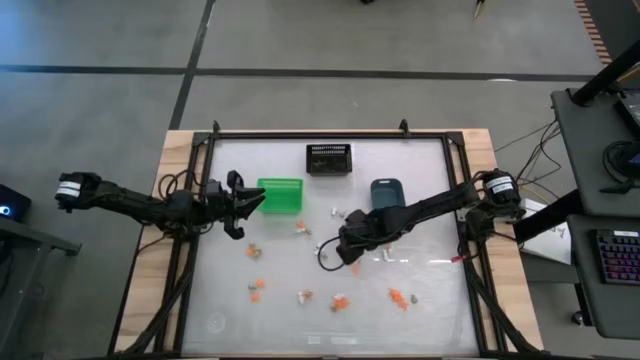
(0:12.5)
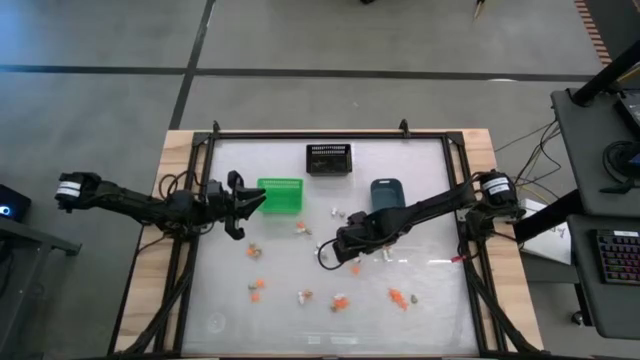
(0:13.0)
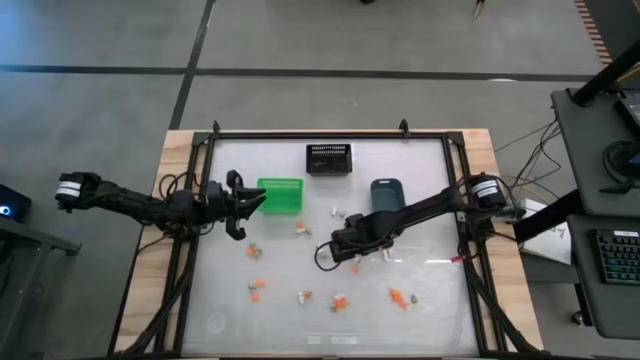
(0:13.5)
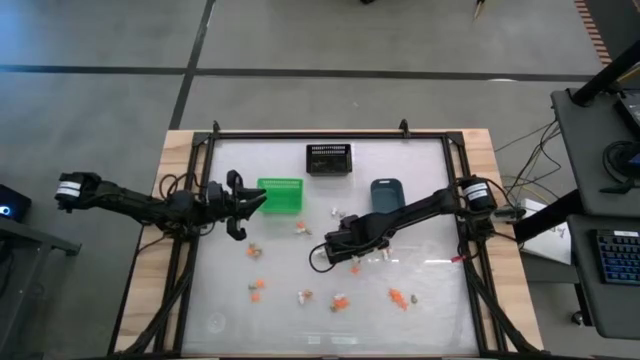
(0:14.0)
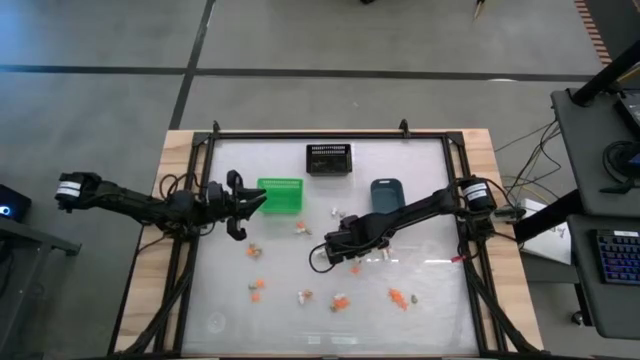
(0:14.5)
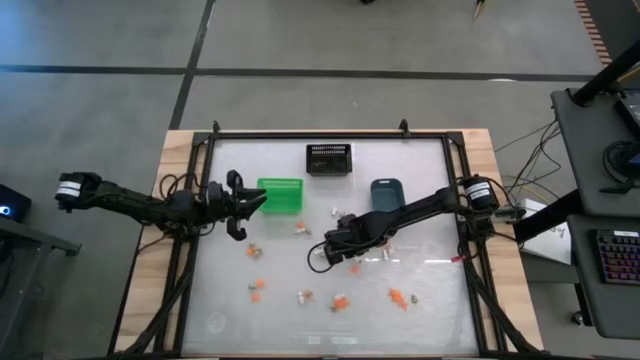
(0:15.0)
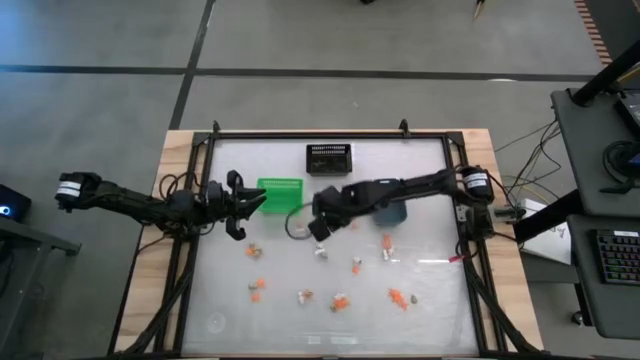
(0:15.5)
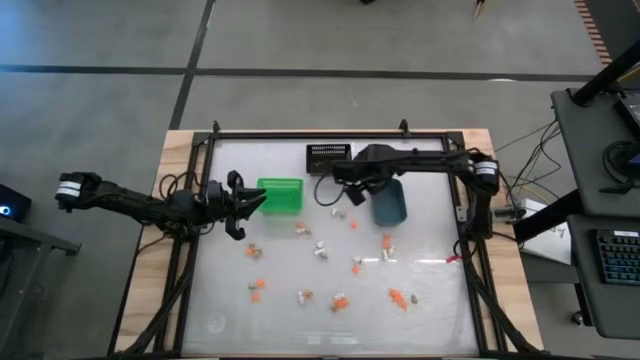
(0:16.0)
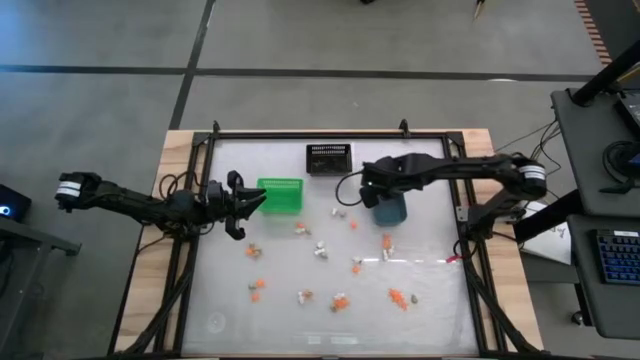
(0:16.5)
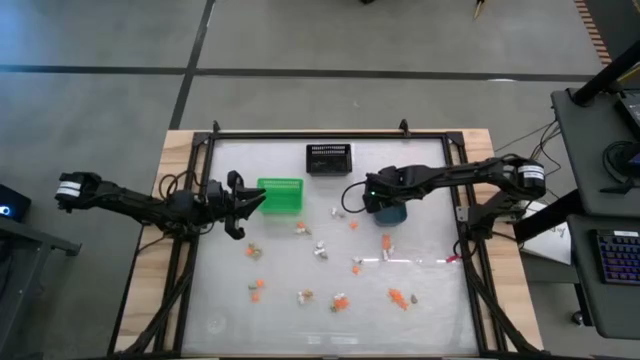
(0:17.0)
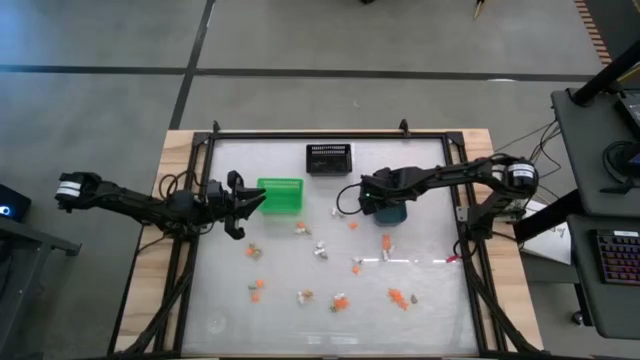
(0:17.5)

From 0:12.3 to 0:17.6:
Task: Sort Halloween decoration
Put the white skeleton toy into the blue bin

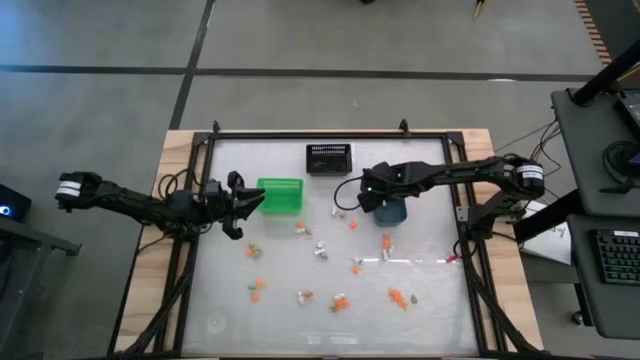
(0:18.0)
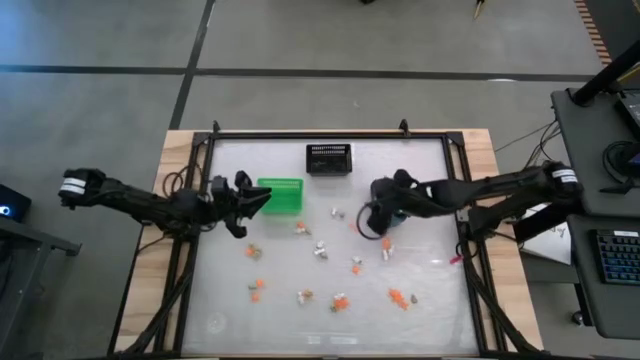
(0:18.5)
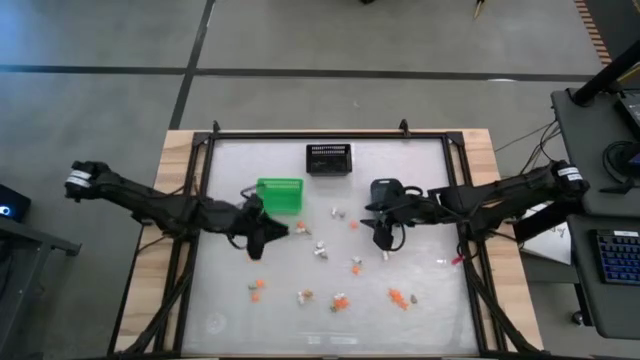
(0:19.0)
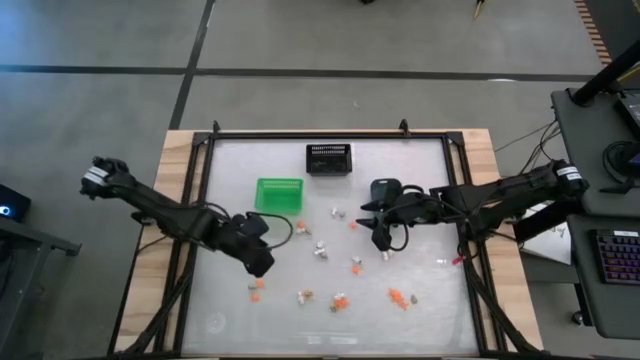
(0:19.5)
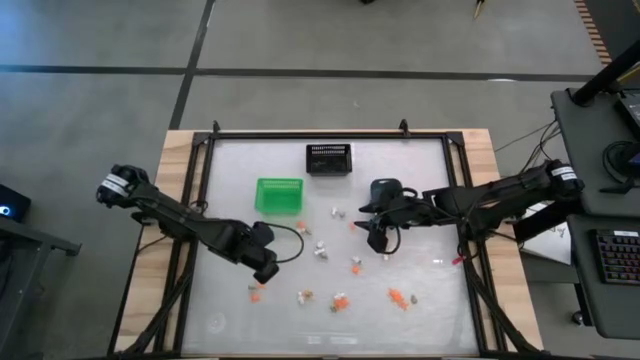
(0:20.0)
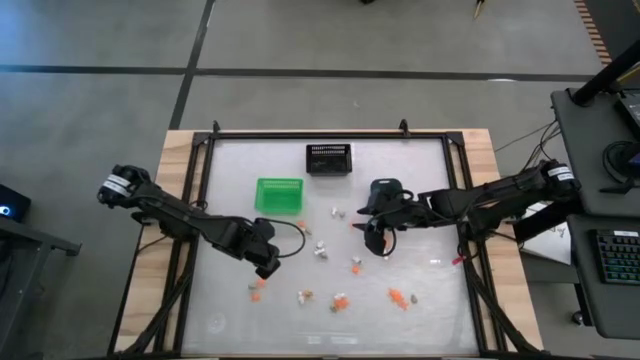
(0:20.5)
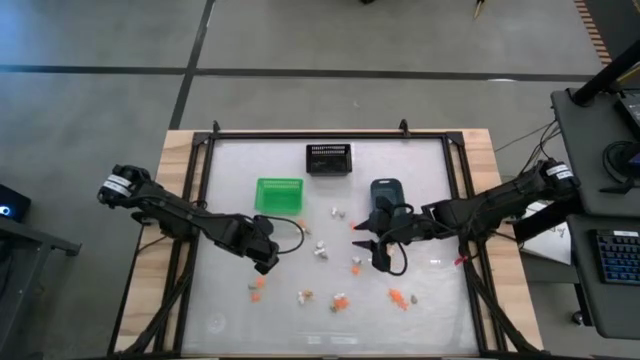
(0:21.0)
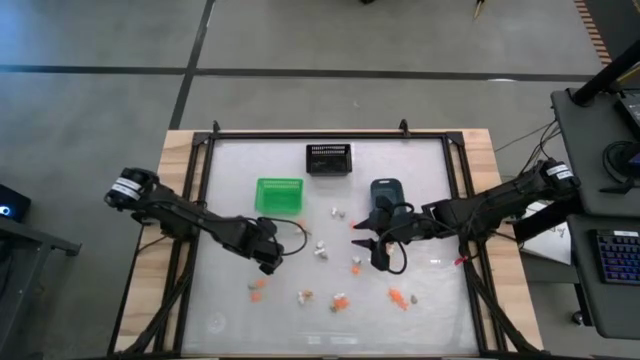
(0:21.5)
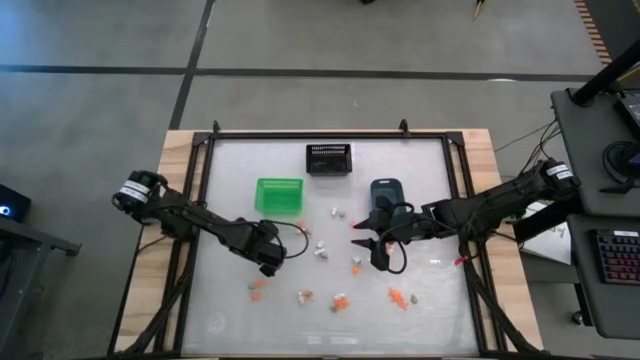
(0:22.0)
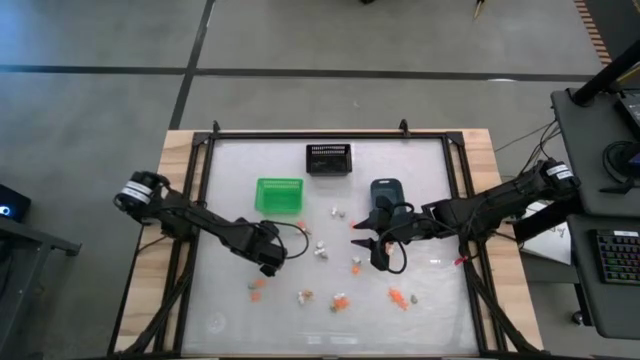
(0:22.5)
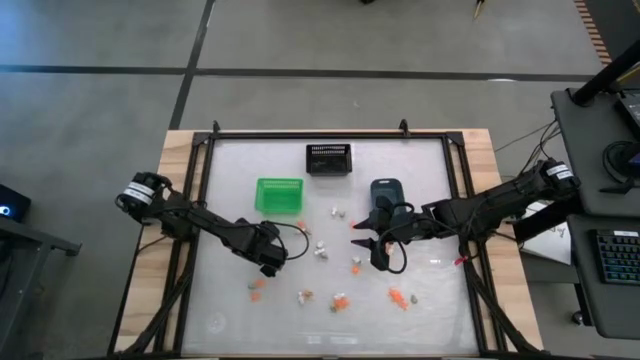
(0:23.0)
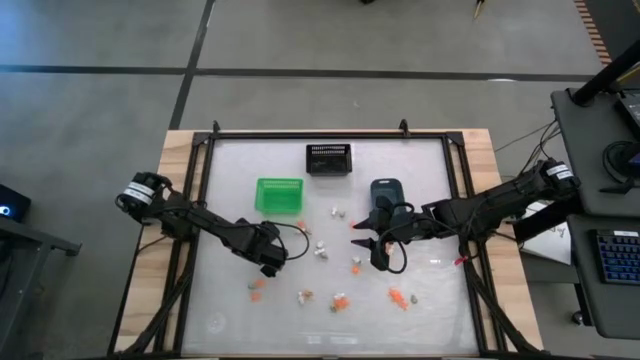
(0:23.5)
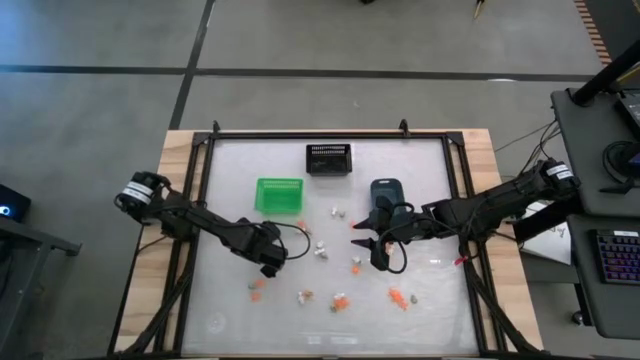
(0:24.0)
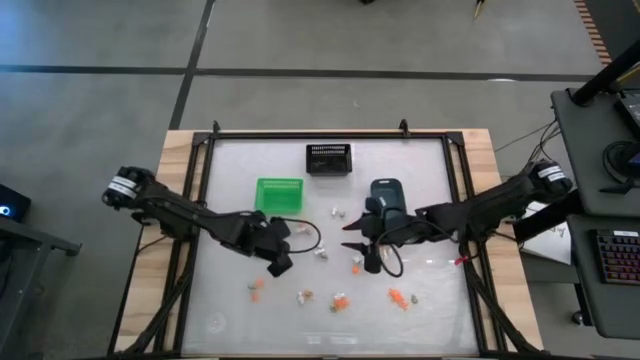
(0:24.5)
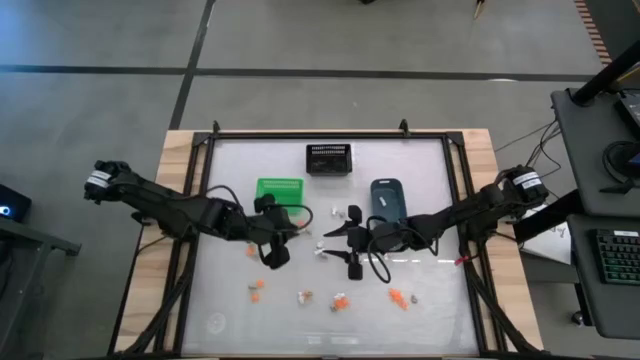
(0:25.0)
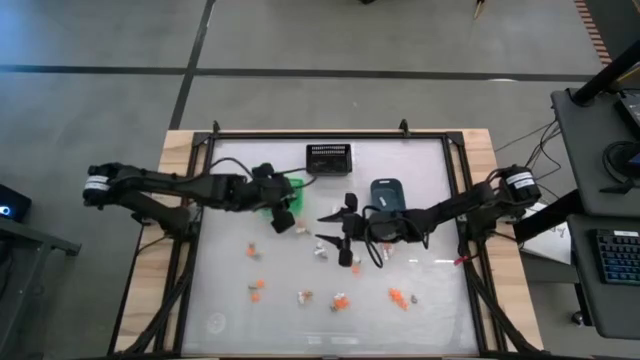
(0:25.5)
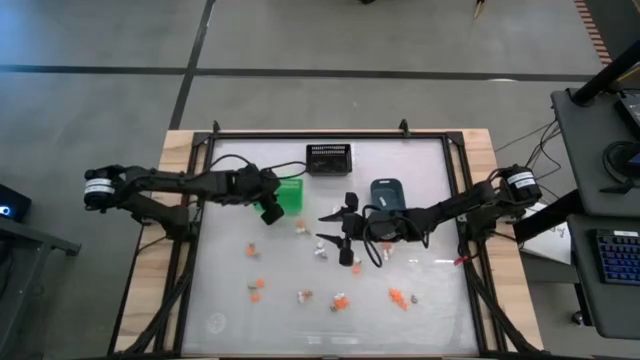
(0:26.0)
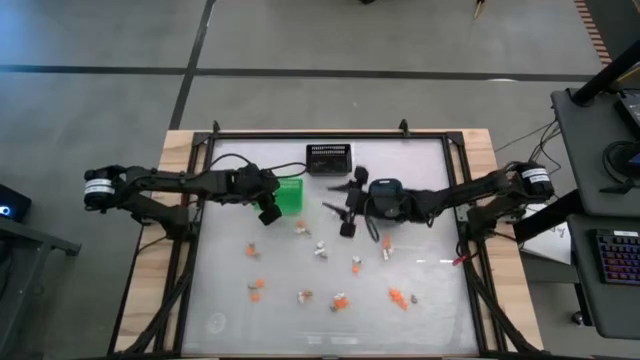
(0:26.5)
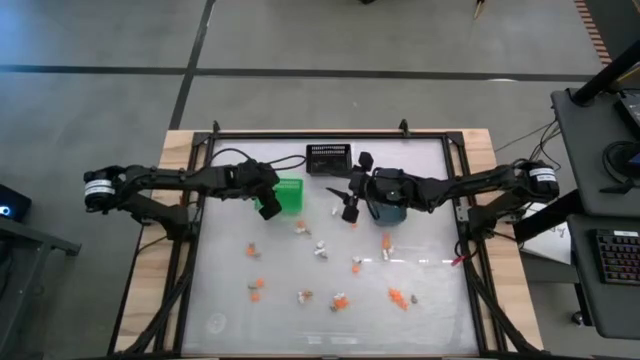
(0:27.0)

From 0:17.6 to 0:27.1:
Put the gray skull toy into the green bin

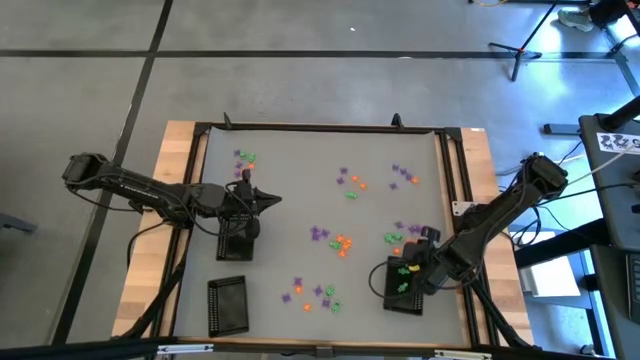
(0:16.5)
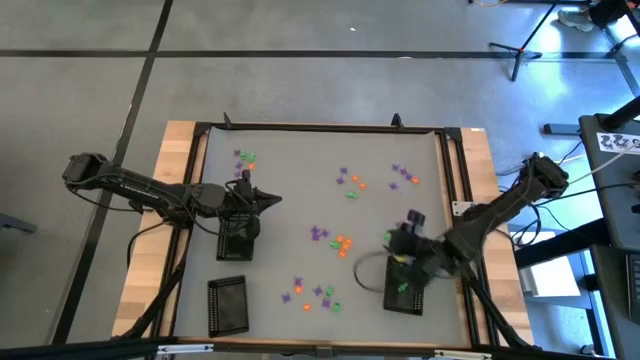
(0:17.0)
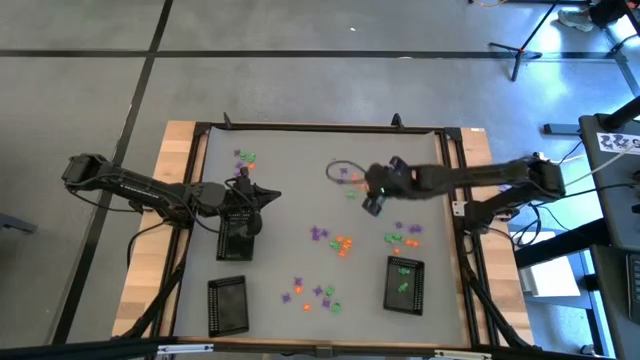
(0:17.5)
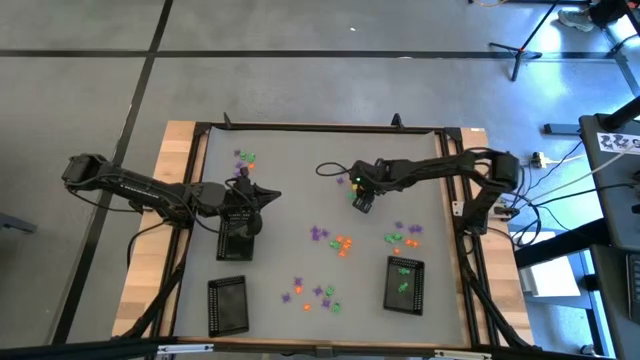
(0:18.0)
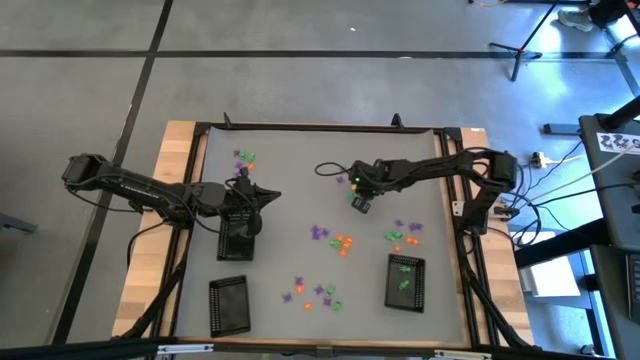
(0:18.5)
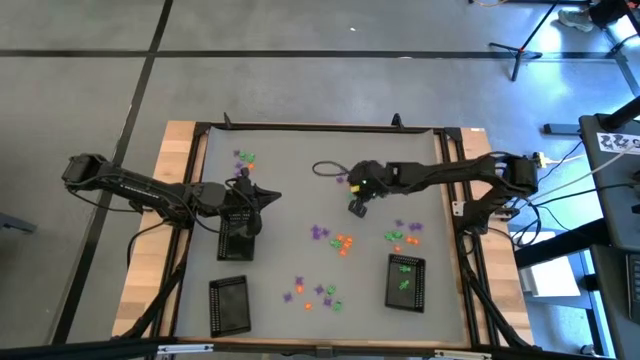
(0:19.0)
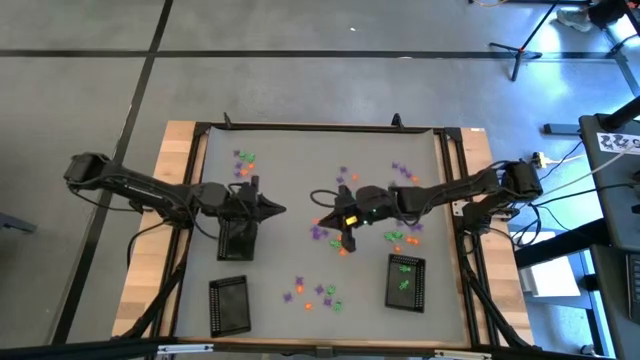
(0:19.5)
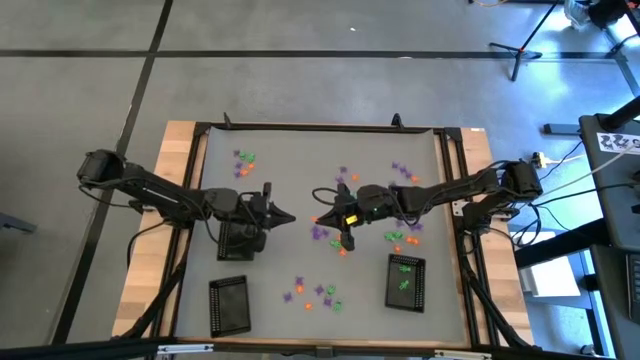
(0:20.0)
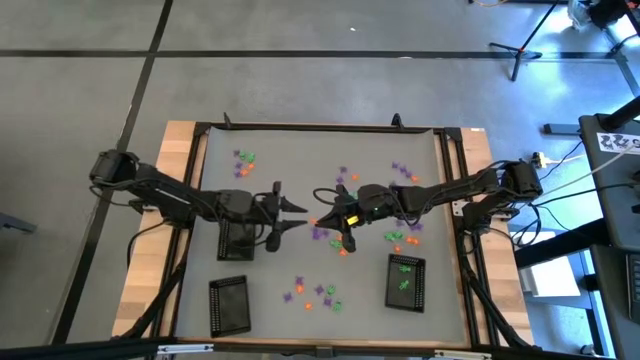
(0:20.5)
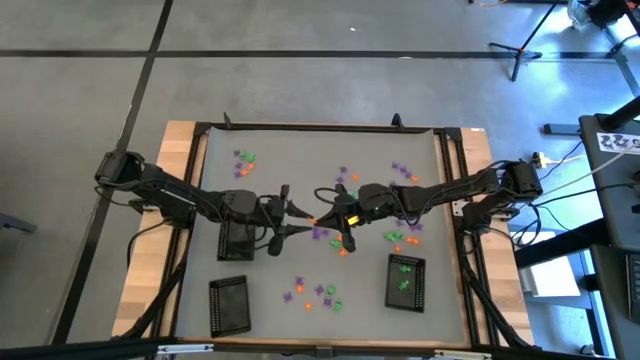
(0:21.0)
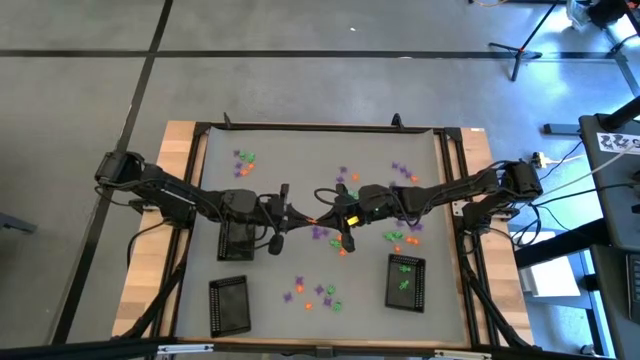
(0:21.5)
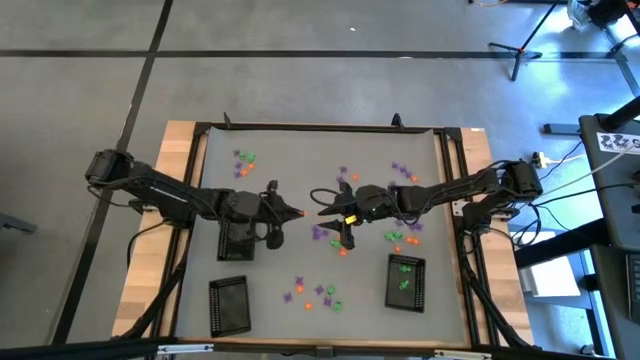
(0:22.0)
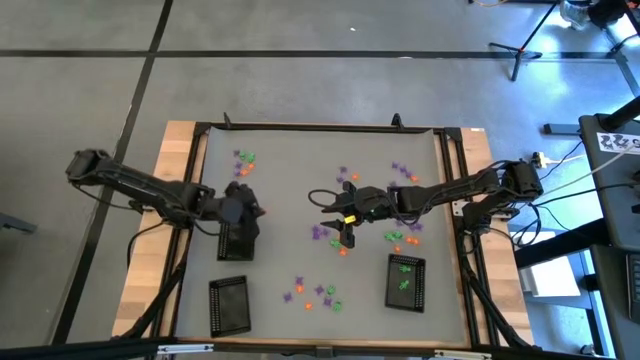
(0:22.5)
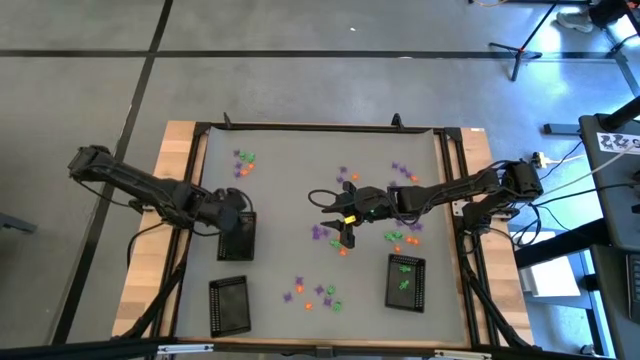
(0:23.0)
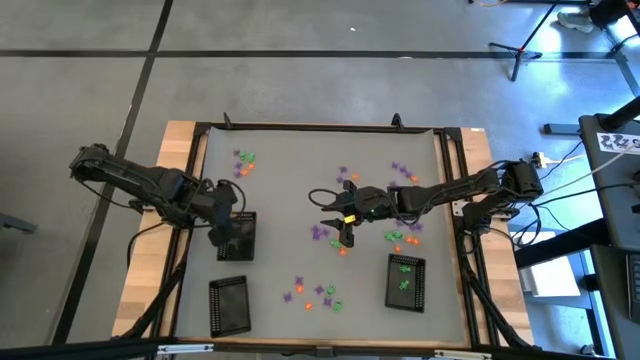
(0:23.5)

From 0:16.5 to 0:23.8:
Task: Sort Halloween decoration
Put the orange spider toy into the top black basket
